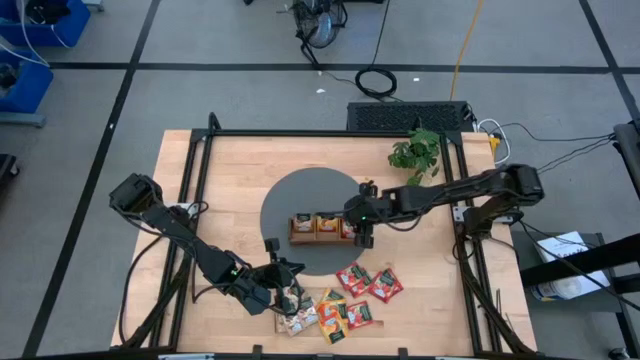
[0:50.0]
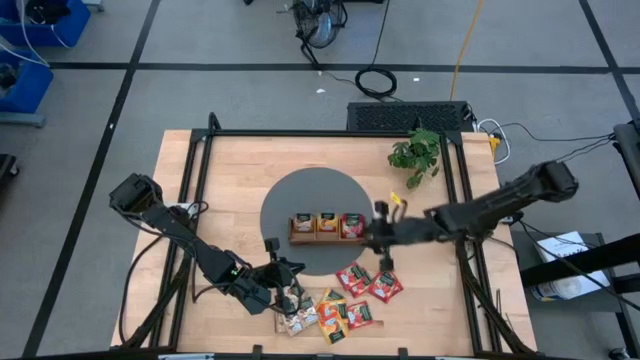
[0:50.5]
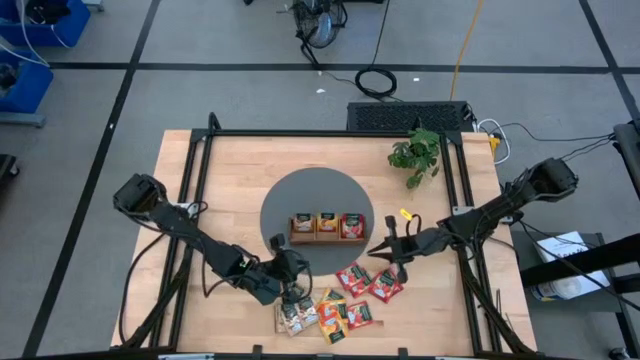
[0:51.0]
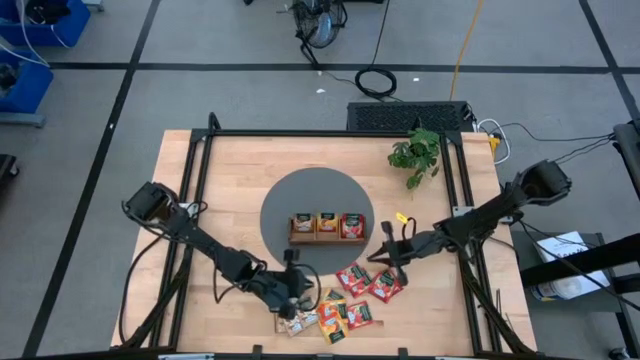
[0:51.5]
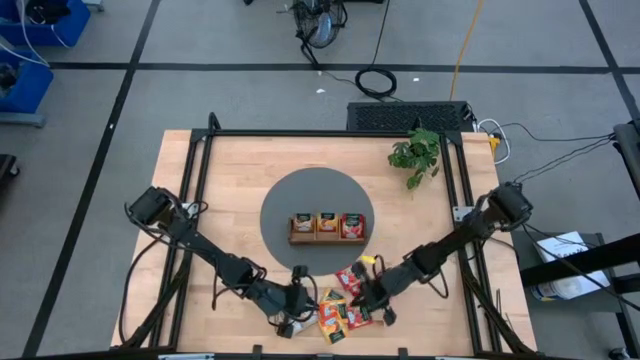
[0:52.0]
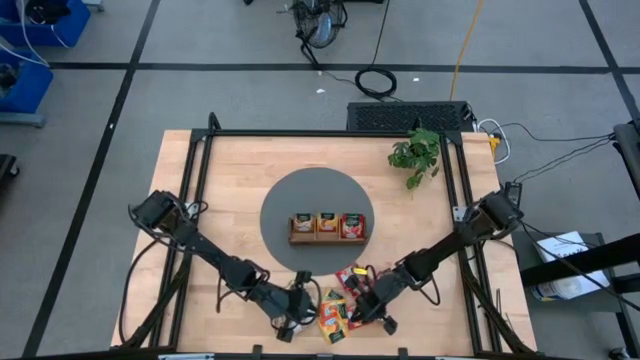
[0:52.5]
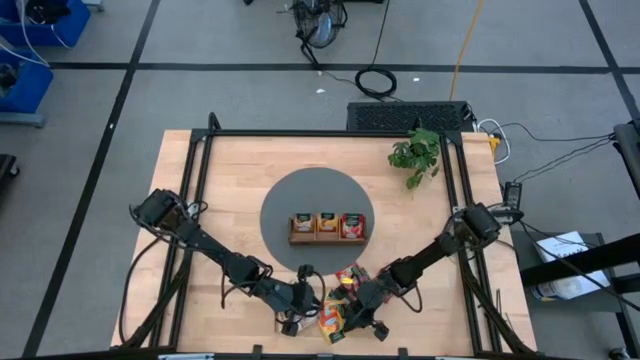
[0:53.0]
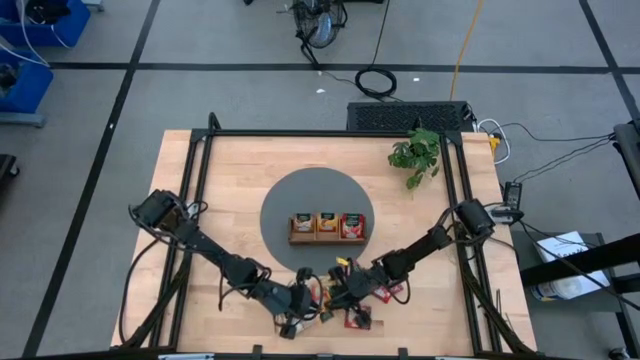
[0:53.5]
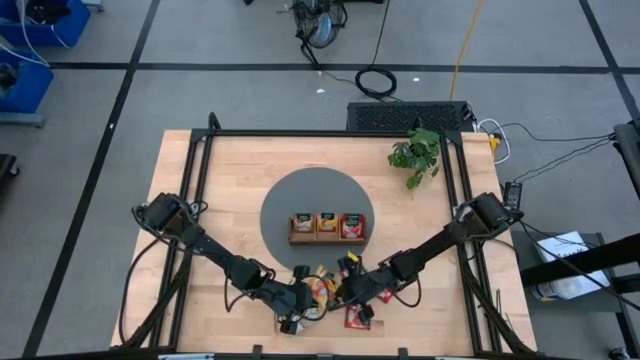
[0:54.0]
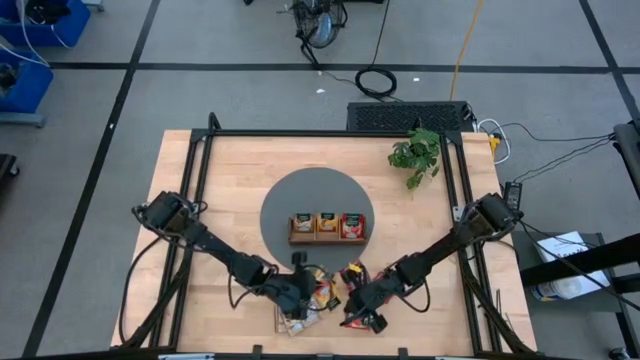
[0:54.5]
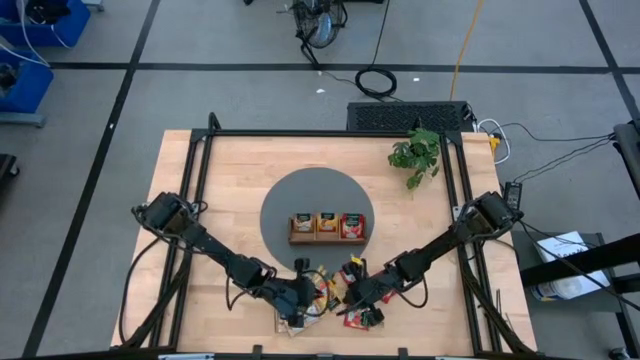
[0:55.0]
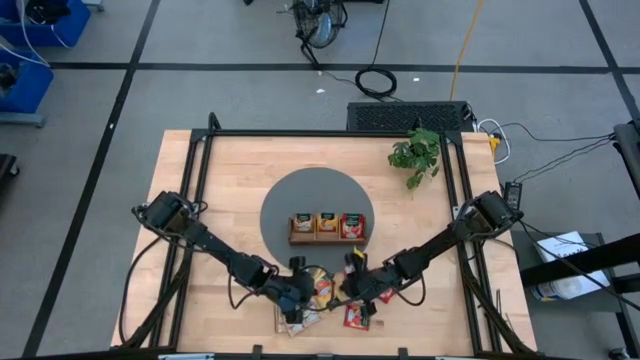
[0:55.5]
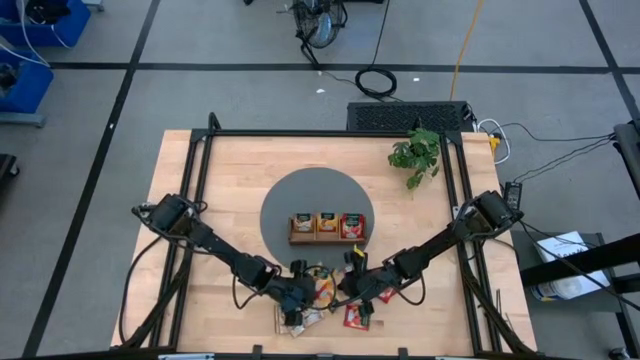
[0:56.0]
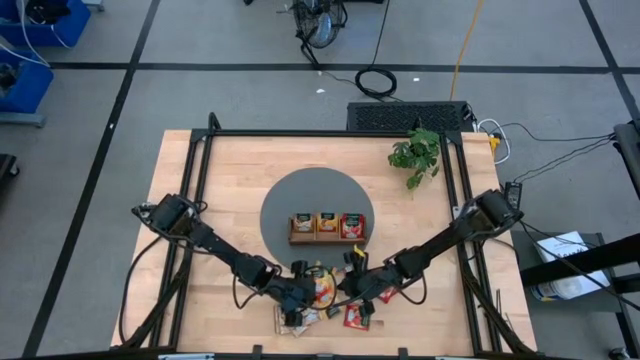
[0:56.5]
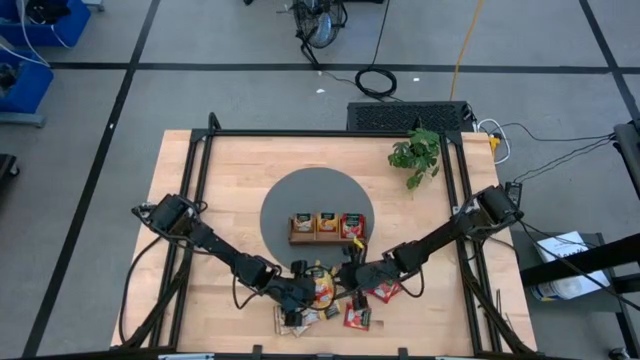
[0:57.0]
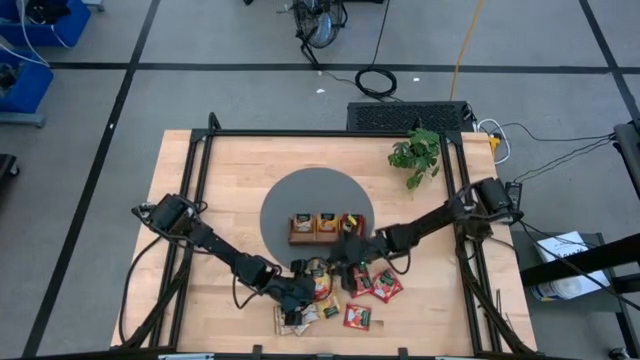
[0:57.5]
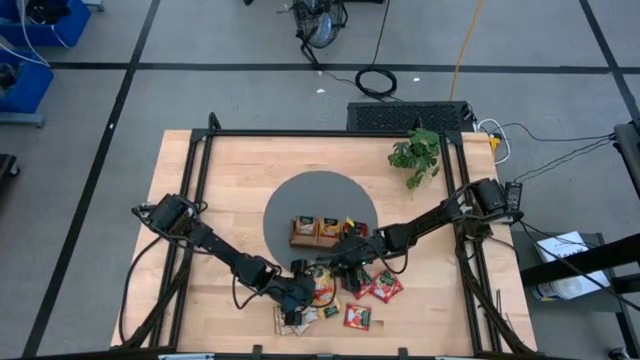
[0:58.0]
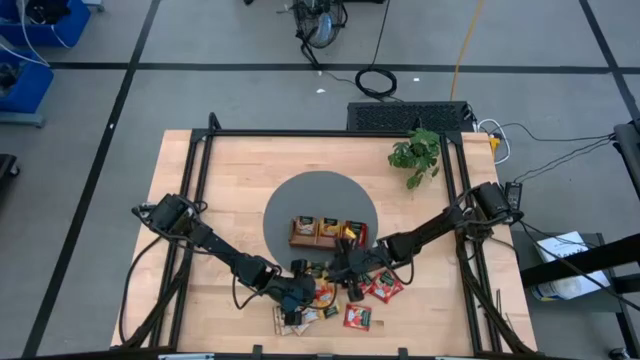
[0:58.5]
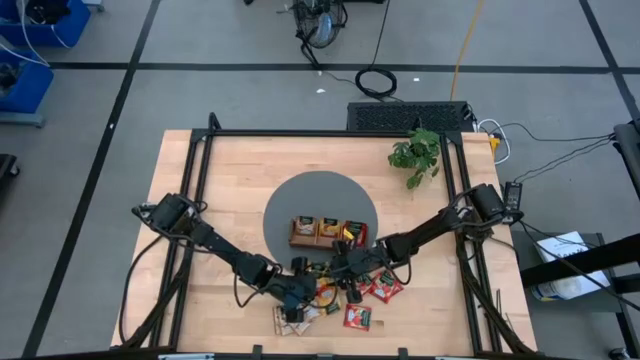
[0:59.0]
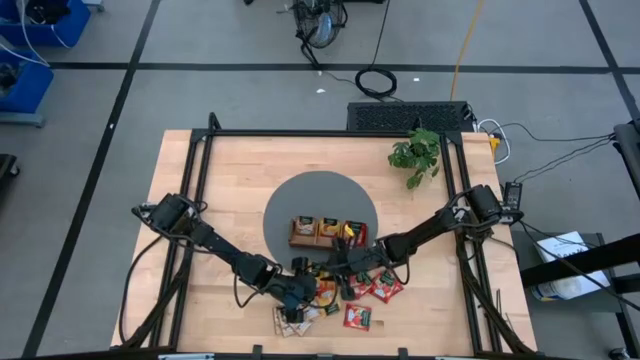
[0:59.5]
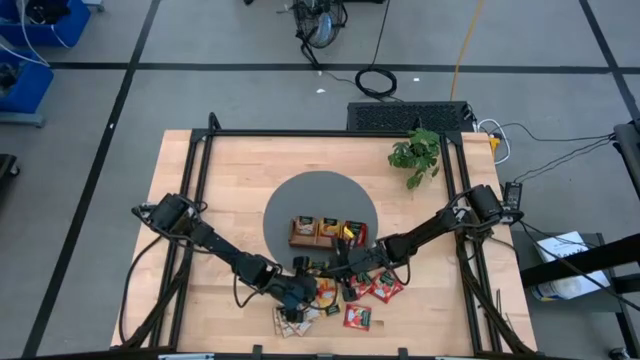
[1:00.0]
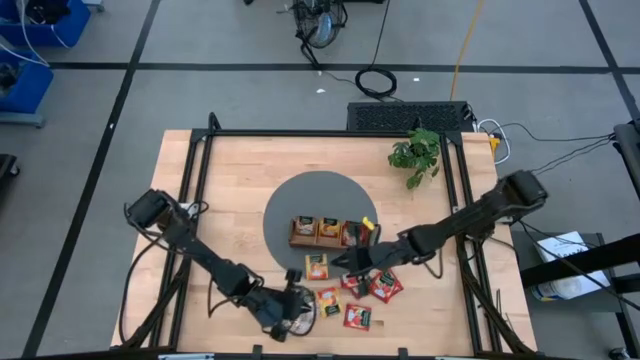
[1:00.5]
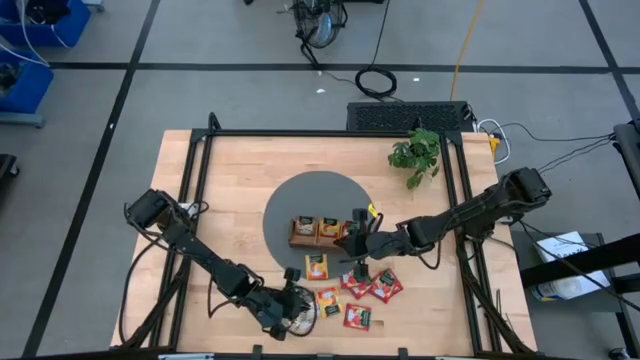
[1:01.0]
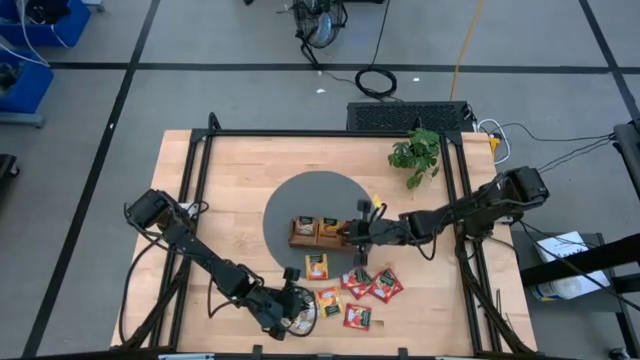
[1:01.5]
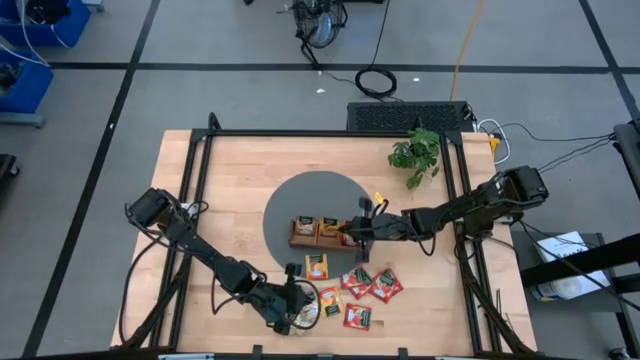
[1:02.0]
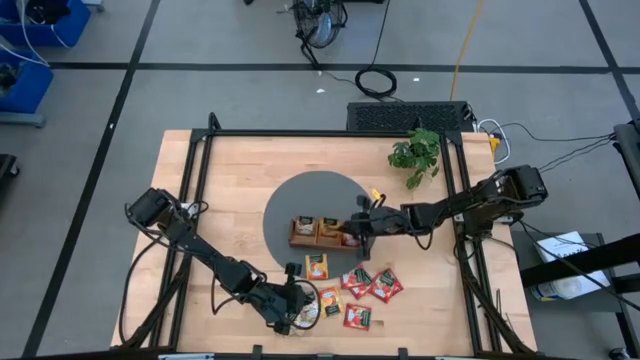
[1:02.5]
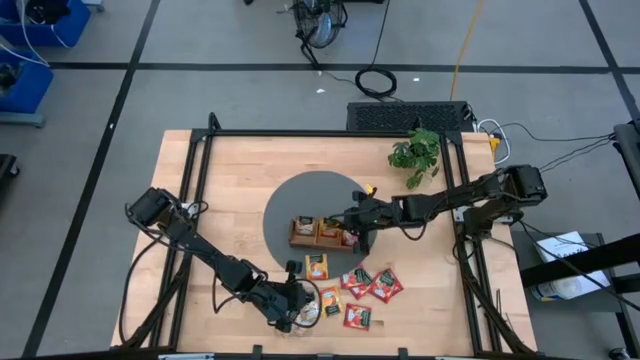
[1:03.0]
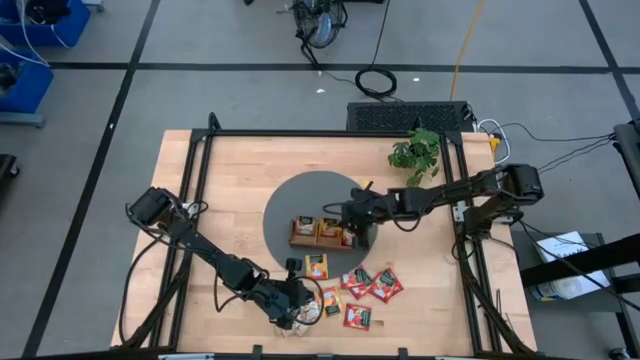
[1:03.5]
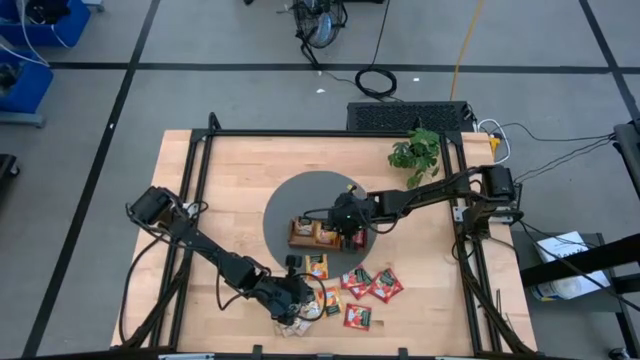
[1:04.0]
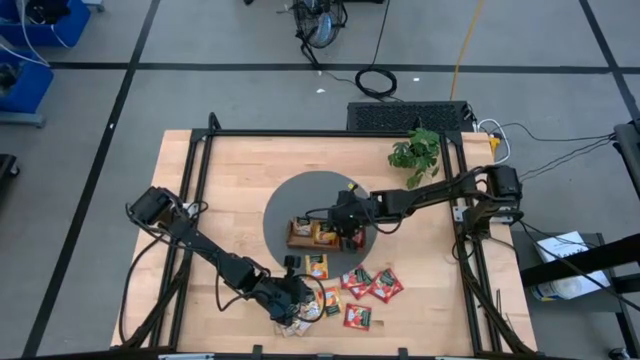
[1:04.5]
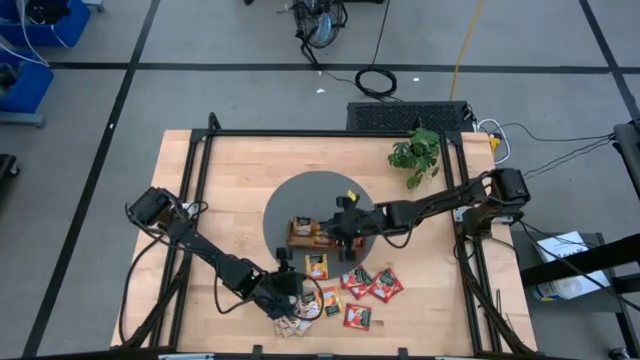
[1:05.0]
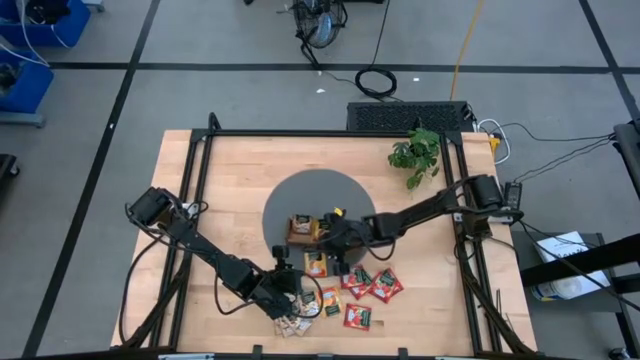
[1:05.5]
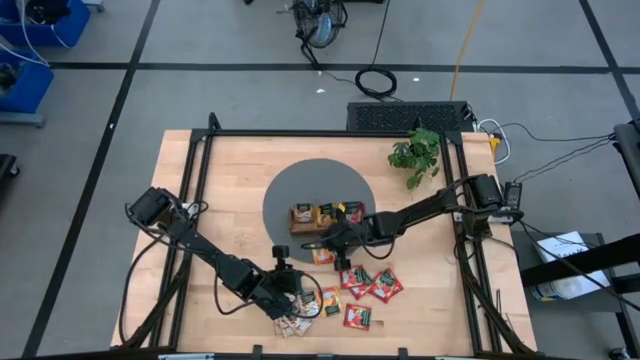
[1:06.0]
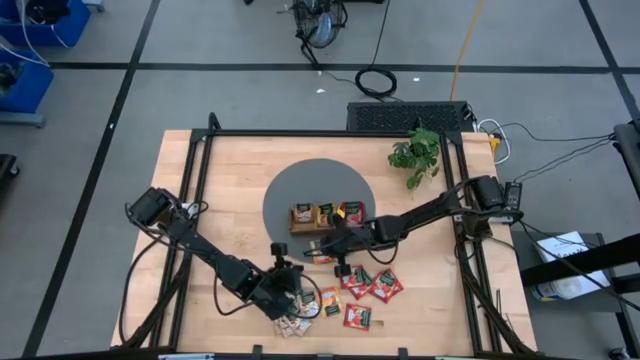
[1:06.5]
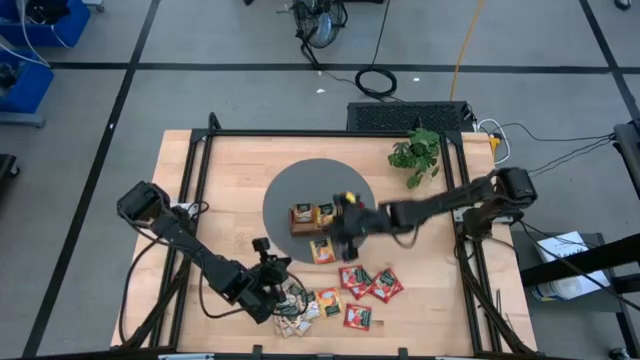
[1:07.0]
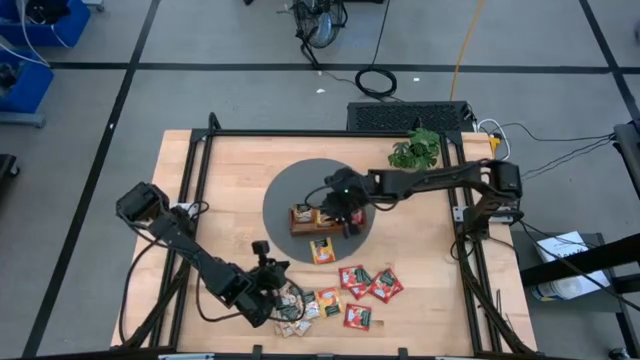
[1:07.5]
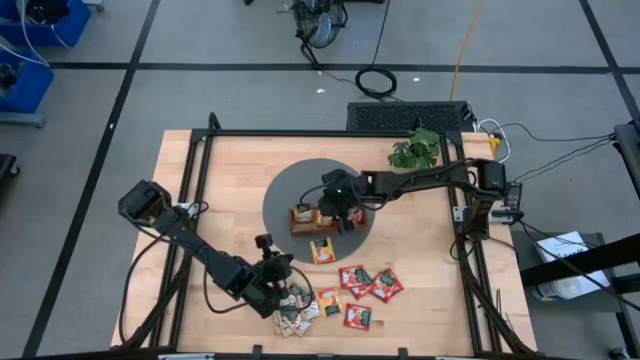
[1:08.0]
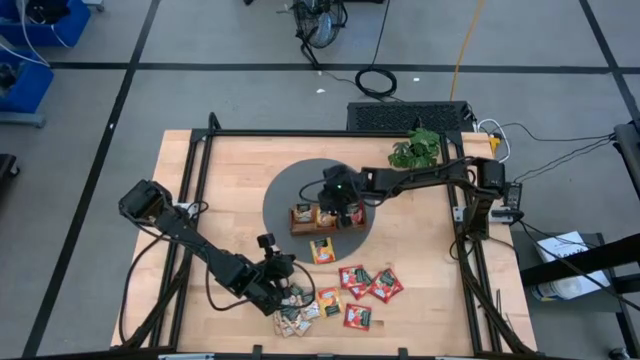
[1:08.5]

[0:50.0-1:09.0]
Task: Pick & Place Tea
Put the mango tea sachet into the middle compartment of the wooden organizer

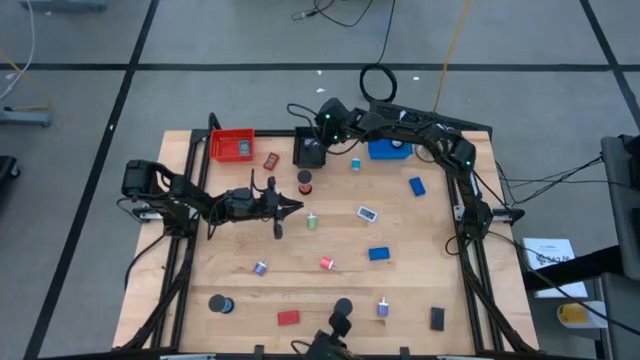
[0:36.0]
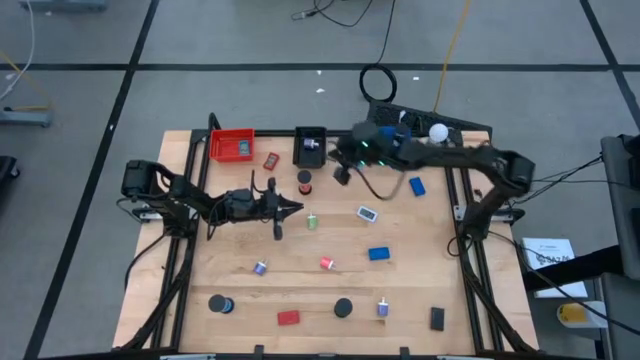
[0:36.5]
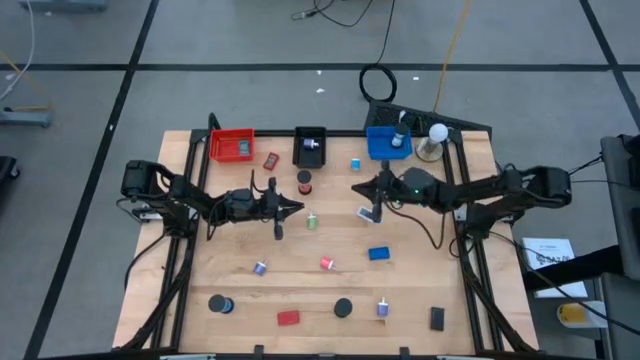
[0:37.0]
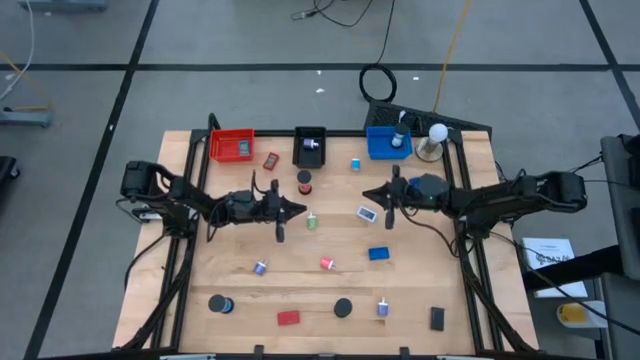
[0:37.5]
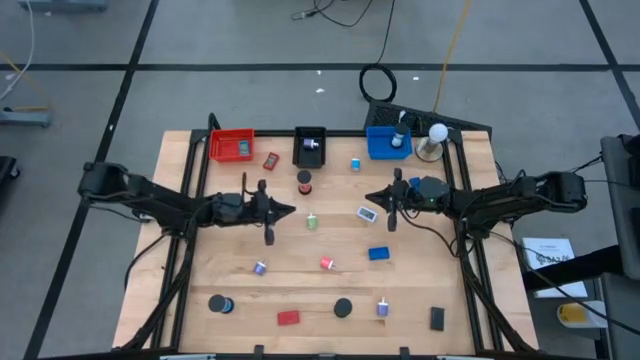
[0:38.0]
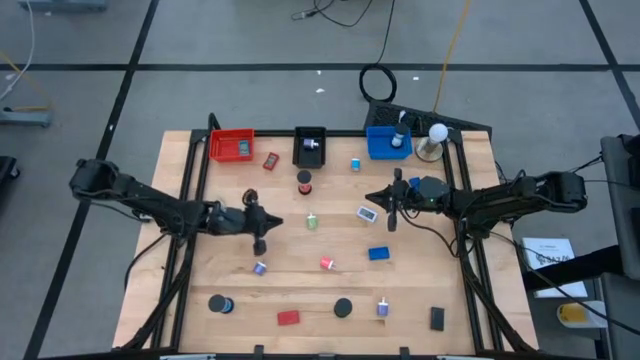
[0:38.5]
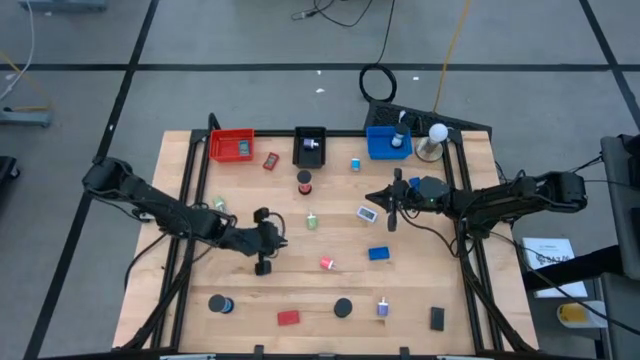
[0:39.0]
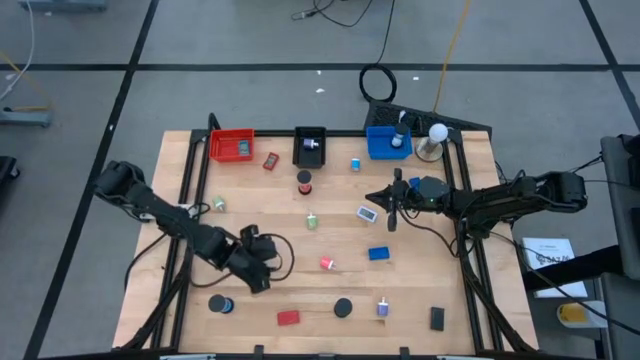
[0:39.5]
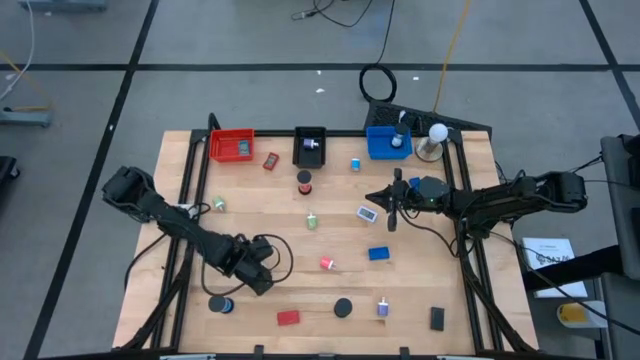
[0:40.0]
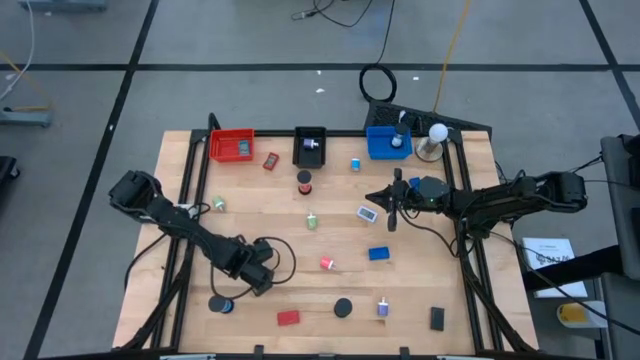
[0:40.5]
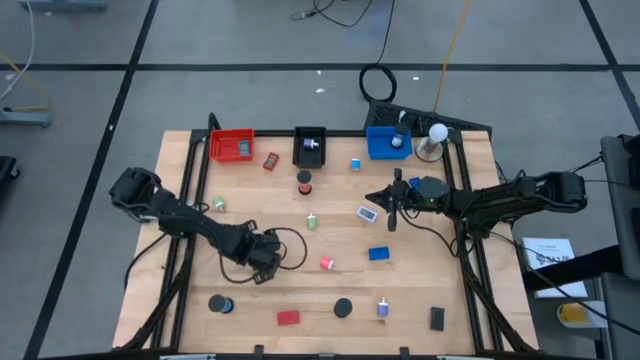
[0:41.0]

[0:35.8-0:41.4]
Task: Pick & Place Office items
Put the left blue charger adapter head into the black bin
